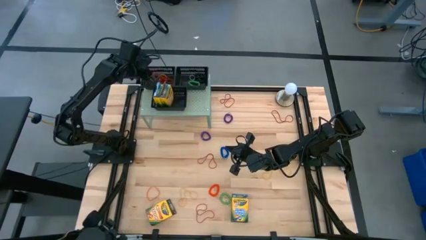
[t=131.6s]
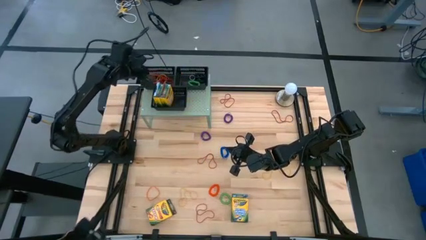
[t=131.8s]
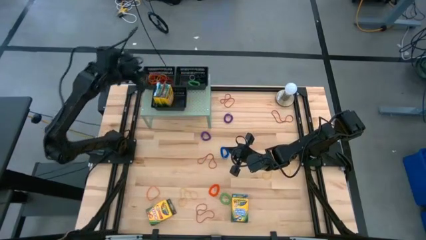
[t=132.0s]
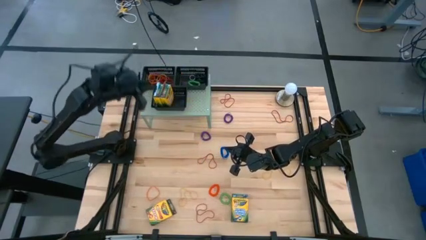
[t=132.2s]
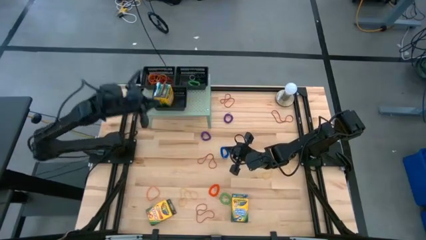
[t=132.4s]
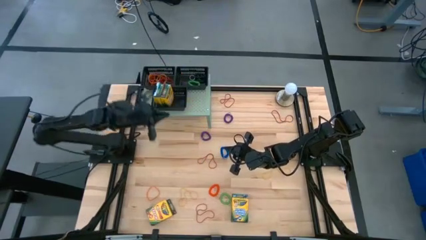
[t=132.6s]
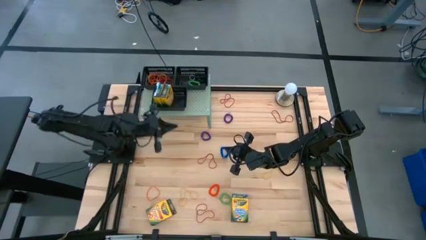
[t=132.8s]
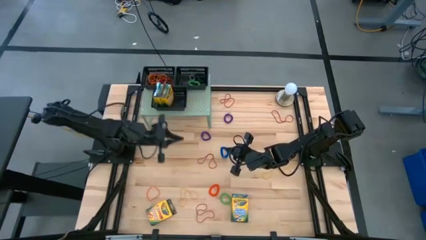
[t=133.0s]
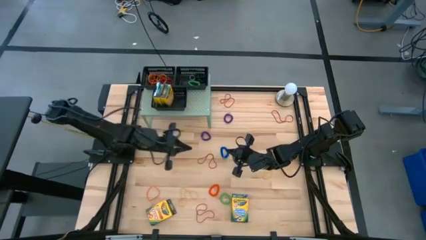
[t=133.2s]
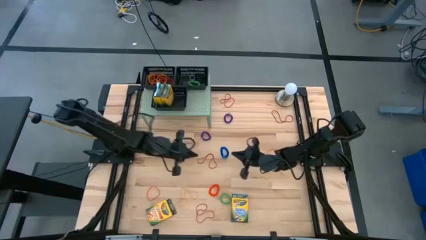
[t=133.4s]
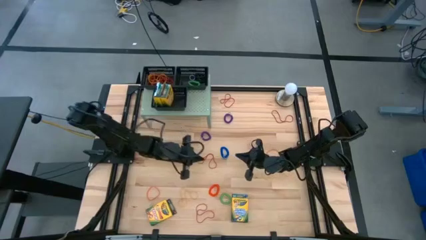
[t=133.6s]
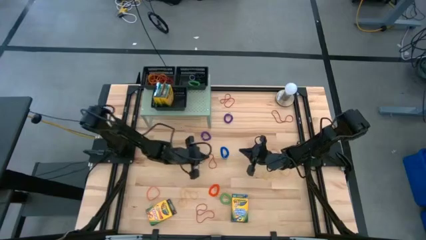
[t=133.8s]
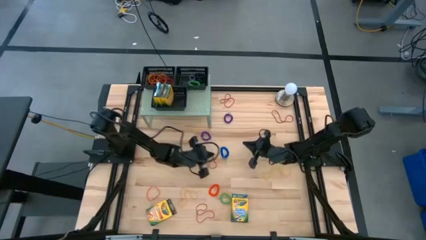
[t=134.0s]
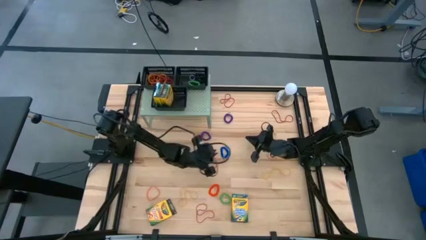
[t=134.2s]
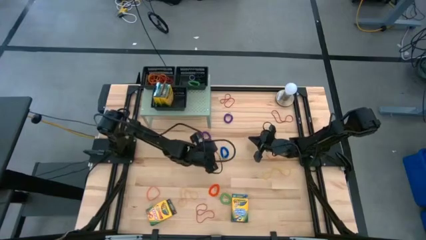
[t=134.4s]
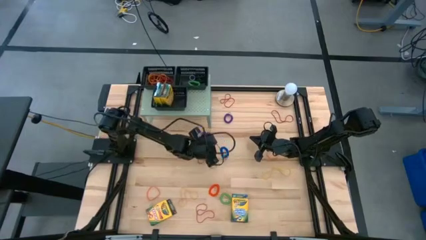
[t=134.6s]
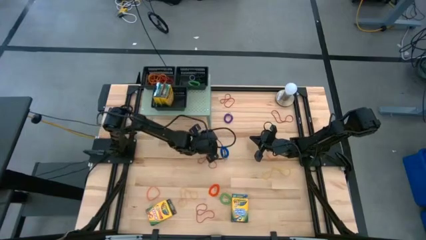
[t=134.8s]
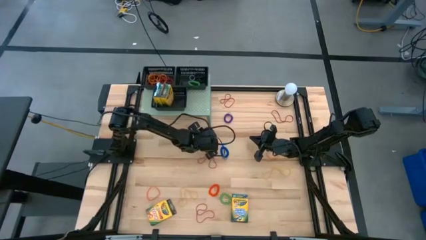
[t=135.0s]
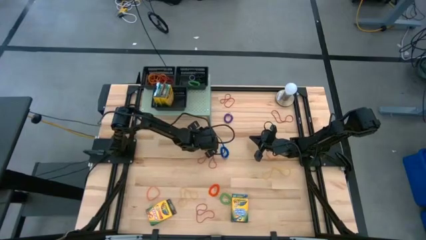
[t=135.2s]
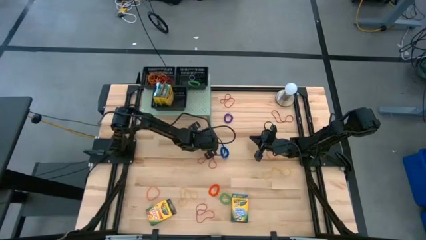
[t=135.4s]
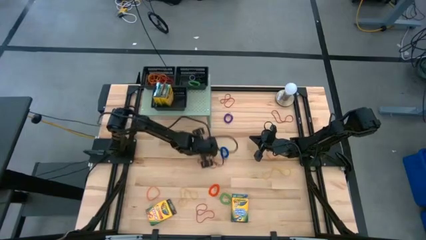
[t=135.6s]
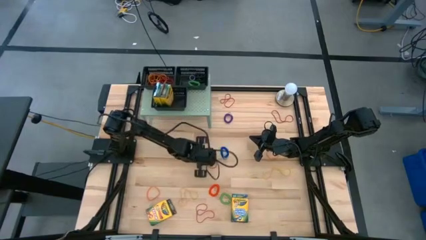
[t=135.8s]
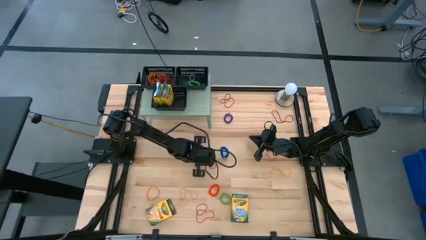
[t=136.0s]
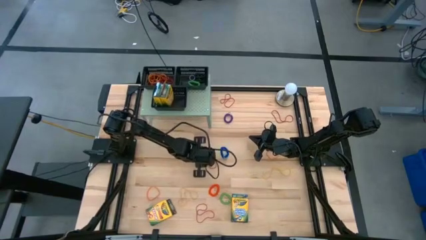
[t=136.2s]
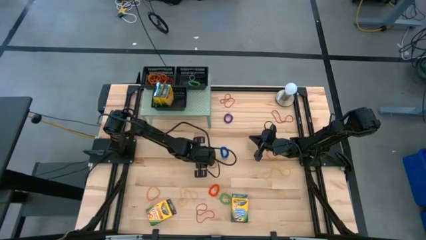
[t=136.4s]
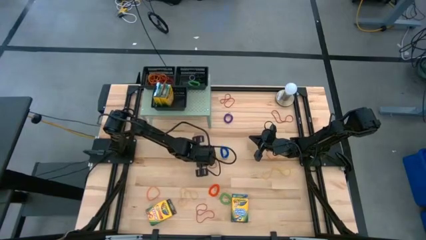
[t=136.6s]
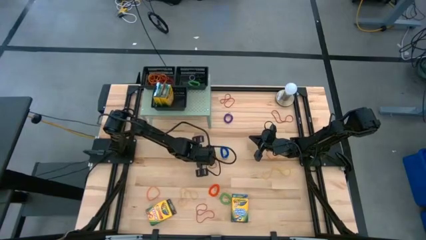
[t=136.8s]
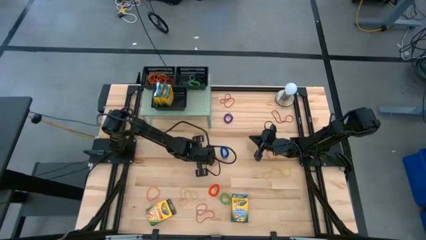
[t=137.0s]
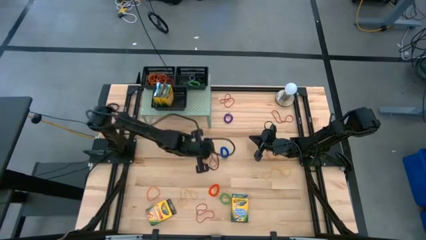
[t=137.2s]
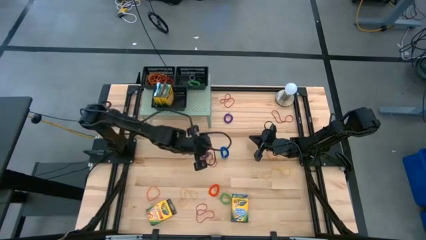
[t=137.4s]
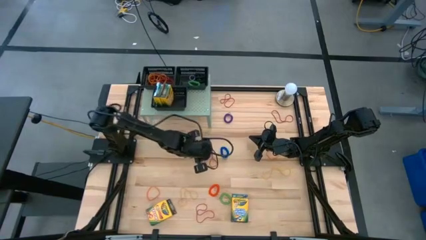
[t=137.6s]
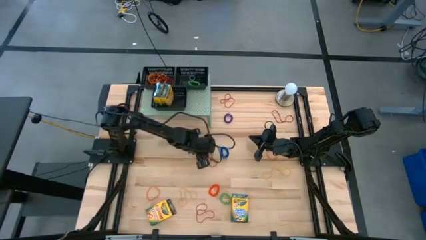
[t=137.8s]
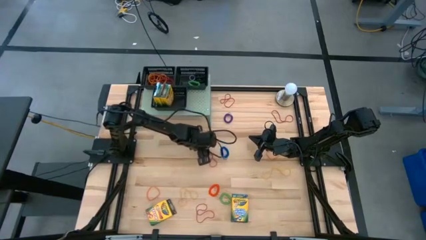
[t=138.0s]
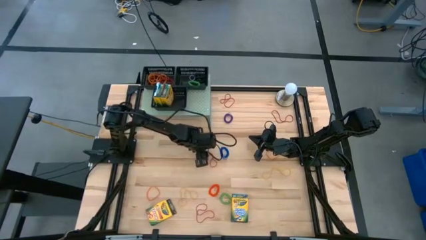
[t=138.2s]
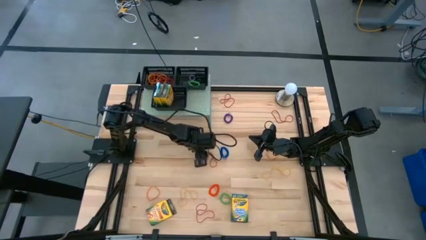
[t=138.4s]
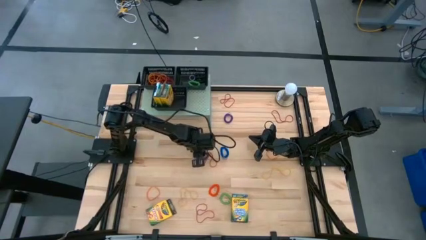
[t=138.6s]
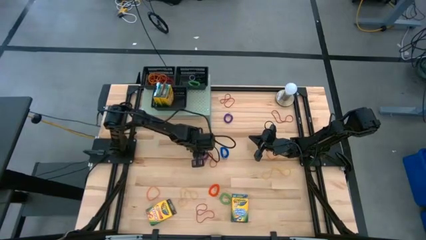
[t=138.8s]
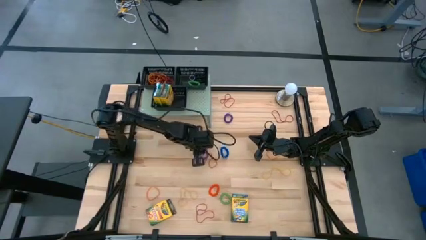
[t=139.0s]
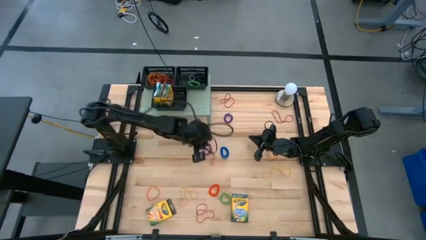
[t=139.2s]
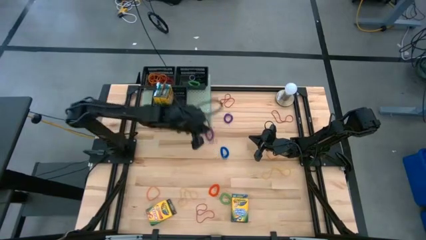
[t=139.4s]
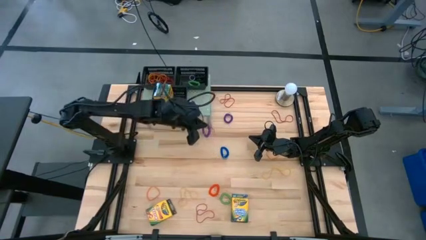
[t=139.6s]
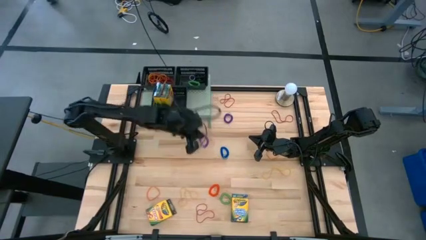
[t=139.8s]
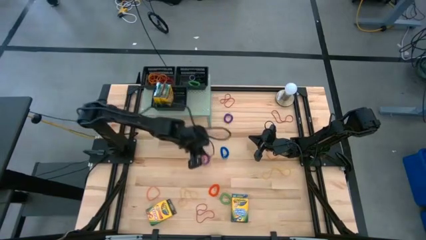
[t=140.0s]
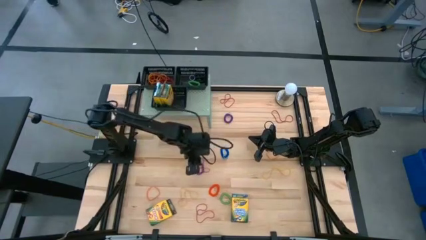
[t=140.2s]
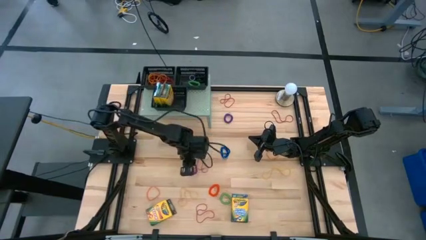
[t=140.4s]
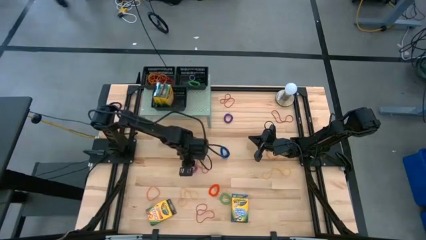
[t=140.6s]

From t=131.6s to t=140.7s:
Task: Pick & Place Office Desk Supplies
Put the violet spring keychain into the top right black bin on the shelf

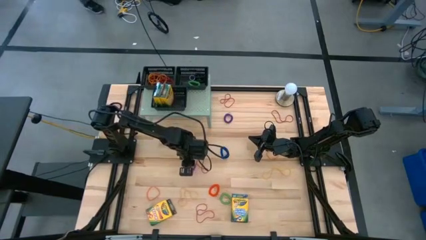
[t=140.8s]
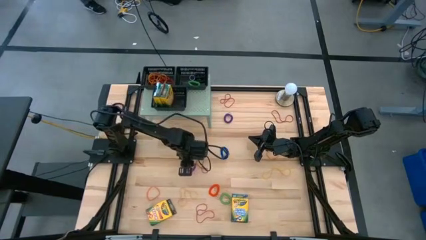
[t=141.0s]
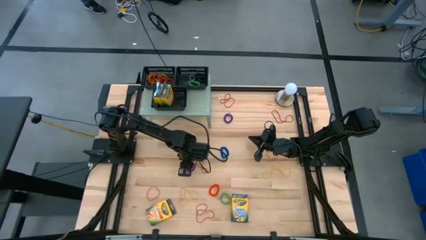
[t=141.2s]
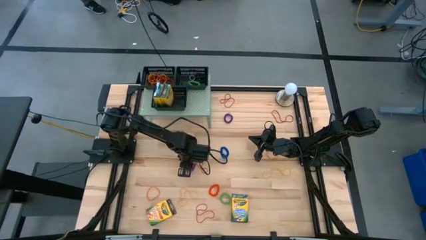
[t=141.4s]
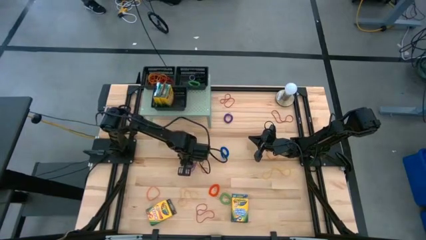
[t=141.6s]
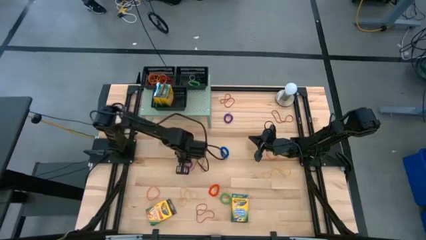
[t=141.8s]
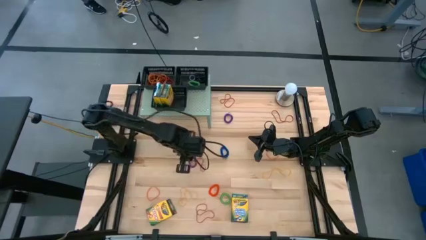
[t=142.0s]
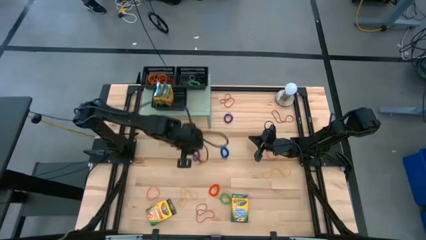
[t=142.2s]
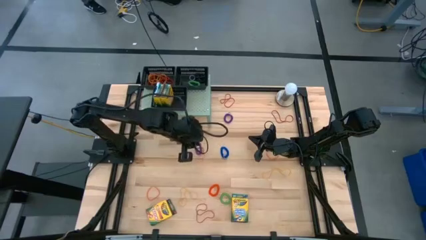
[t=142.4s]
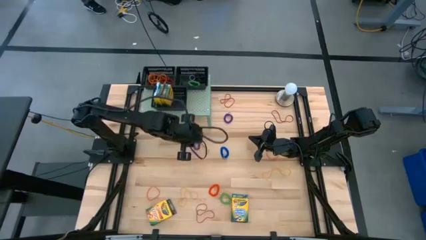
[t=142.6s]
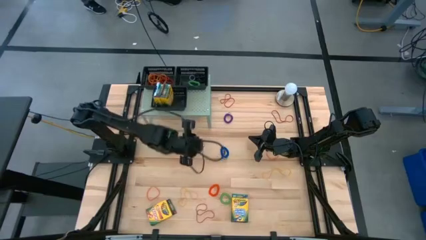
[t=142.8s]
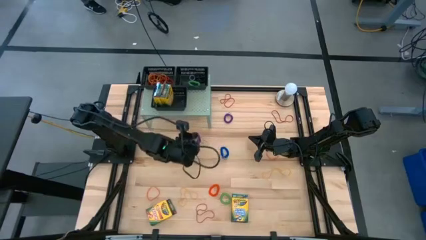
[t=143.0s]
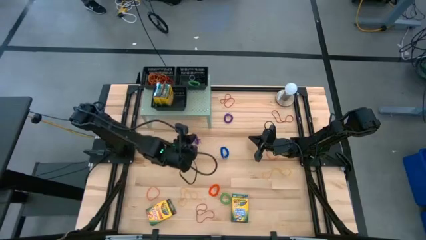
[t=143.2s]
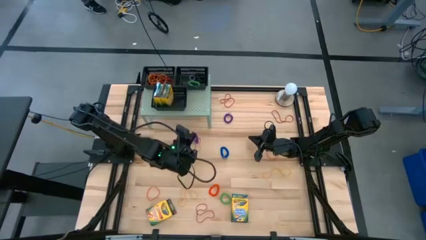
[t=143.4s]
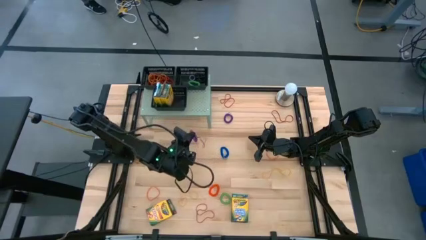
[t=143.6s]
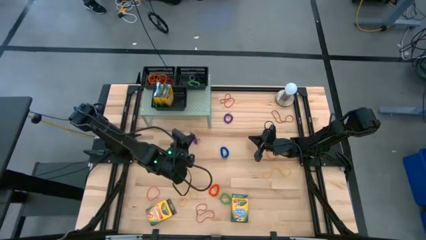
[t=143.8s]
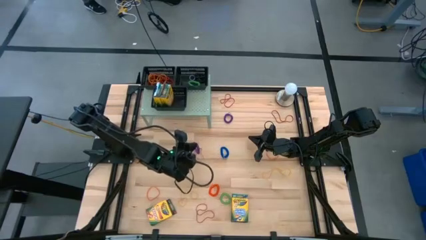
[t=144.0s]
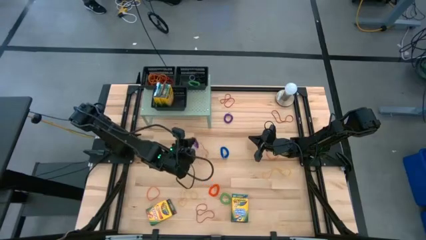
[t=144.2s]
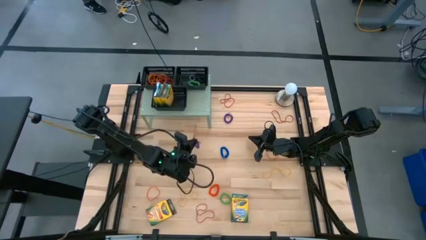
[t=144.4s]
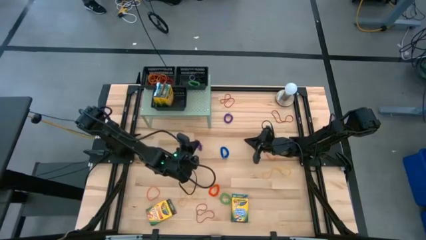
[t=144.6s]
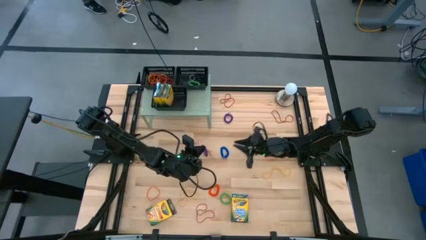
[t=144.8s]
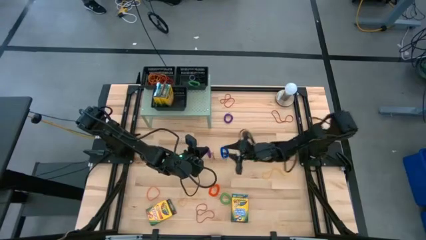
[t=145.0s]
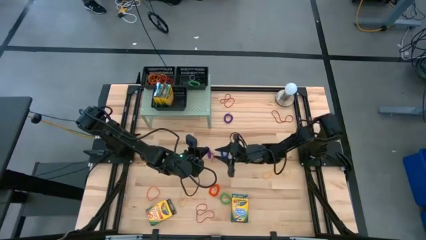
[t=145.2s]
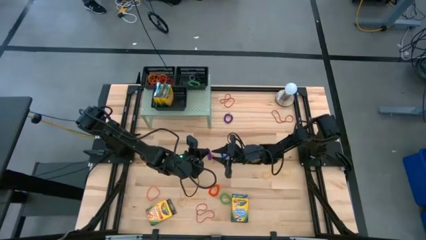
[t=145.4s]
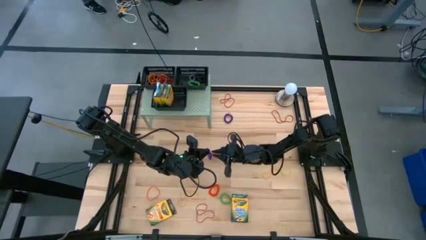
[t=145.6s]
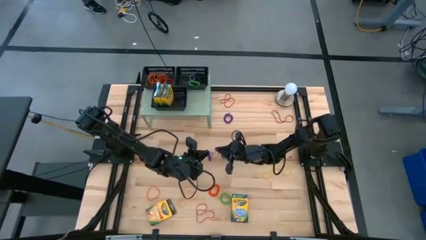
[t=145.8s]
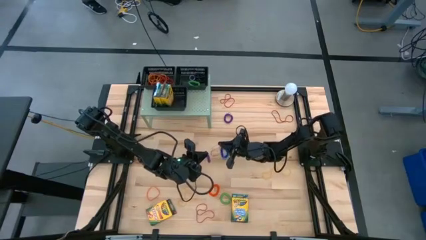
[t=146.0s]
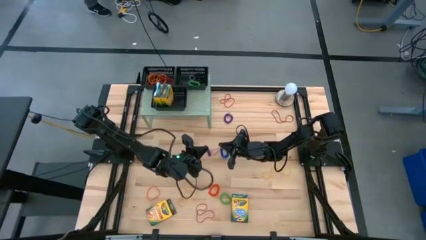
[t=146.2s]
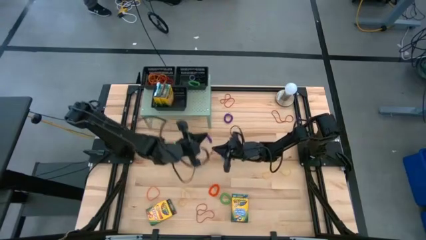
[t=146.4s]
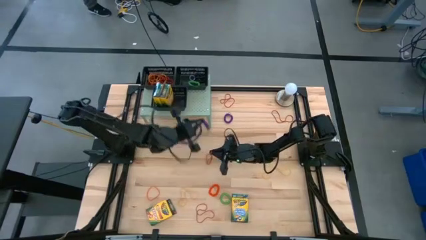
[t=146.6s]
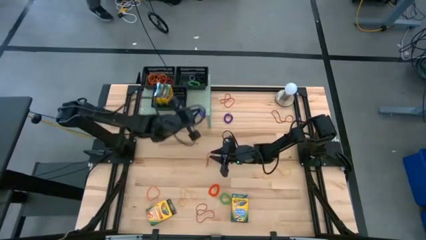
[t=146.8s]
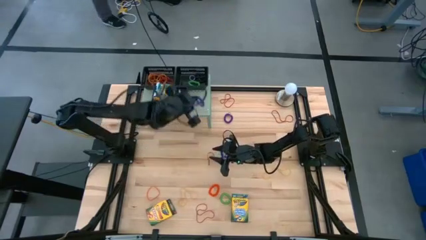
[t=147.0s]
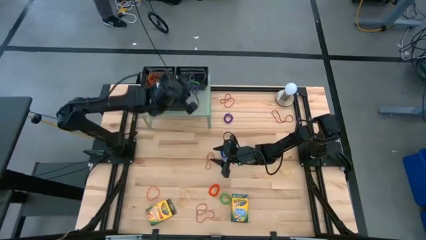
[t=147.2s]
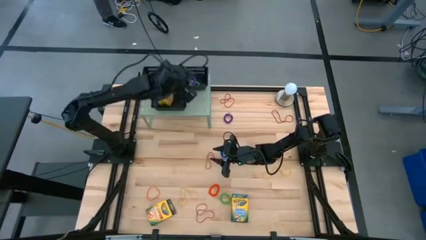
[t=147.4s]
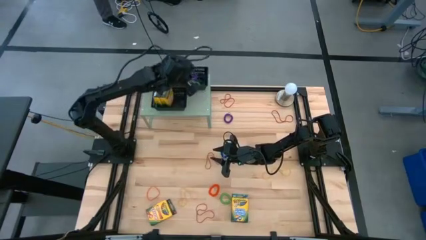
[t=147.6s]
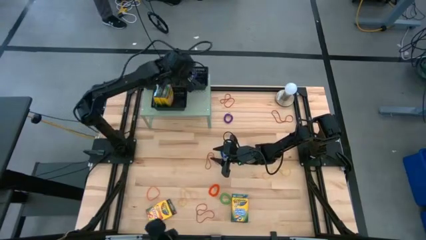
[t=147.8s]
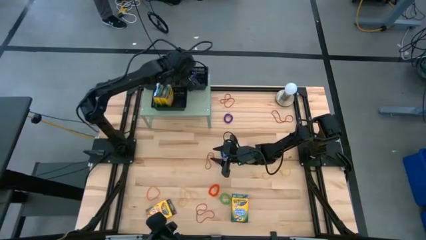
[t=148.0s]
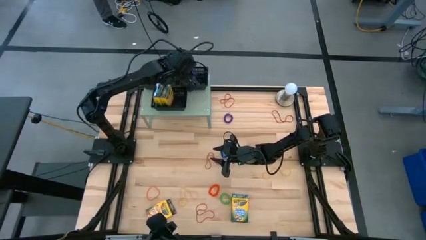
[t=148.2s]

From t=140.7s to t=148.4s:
Put the violet spring keychain into the top right black bin on the shelf
